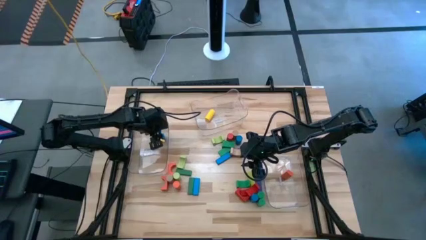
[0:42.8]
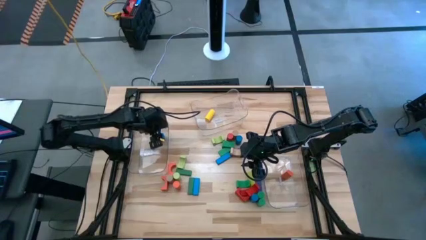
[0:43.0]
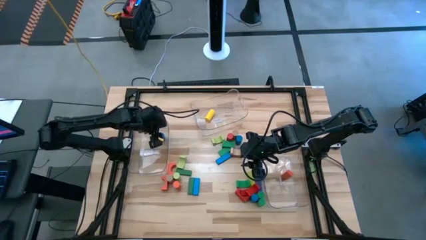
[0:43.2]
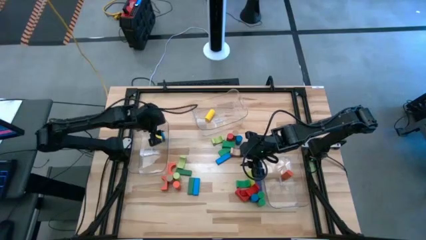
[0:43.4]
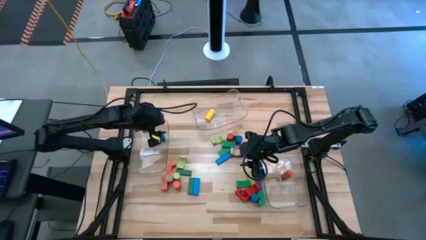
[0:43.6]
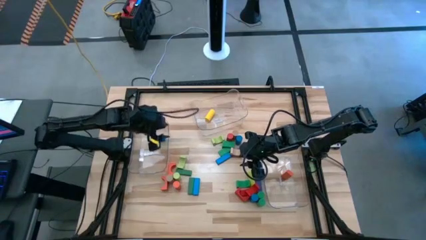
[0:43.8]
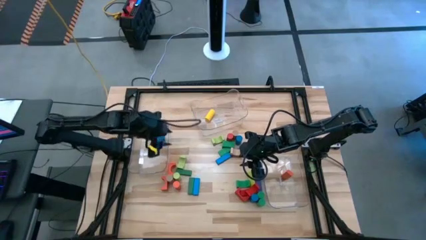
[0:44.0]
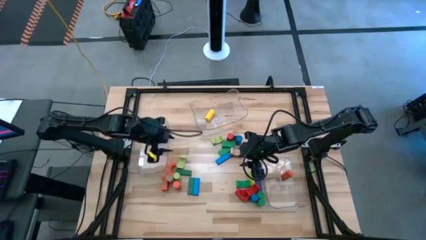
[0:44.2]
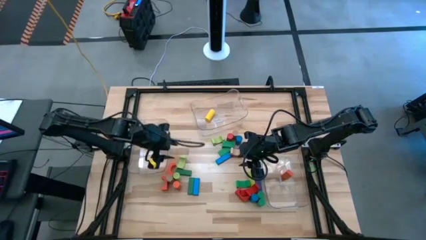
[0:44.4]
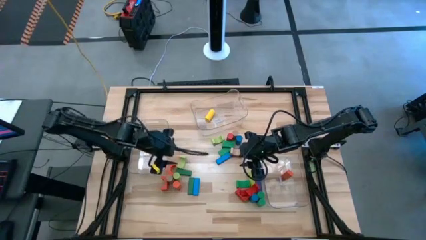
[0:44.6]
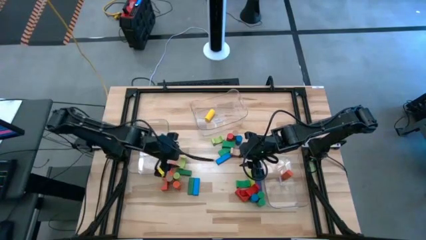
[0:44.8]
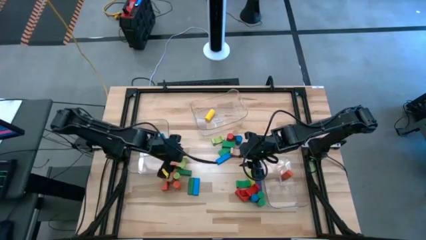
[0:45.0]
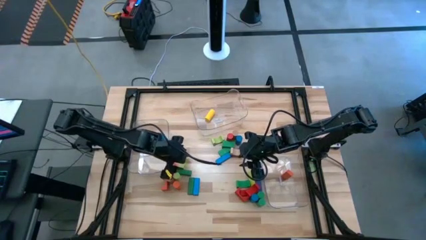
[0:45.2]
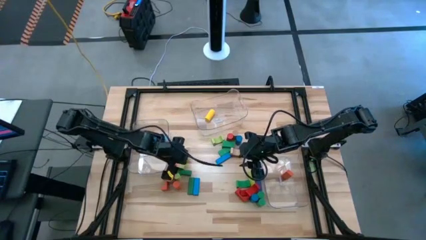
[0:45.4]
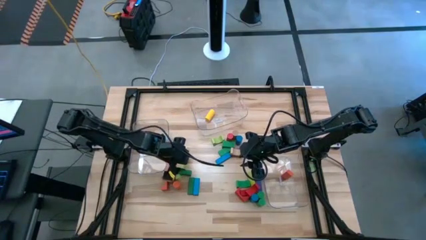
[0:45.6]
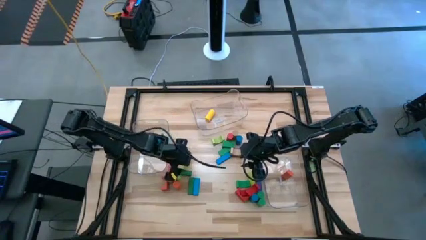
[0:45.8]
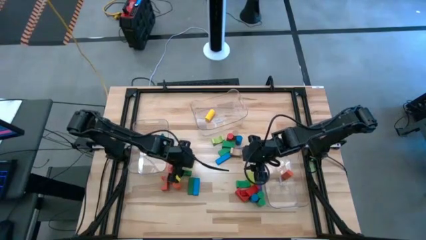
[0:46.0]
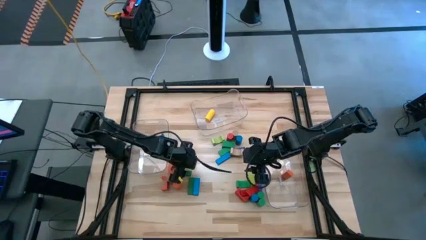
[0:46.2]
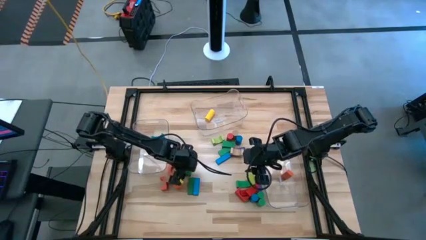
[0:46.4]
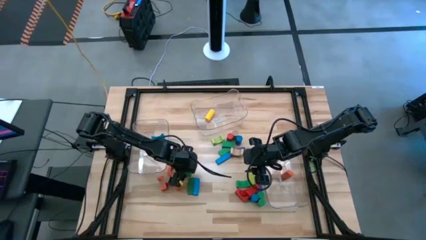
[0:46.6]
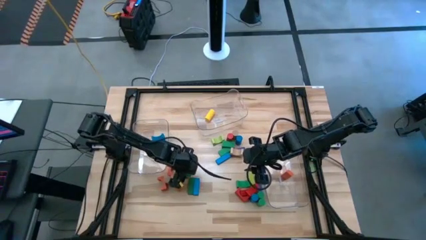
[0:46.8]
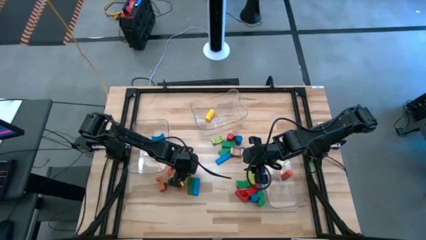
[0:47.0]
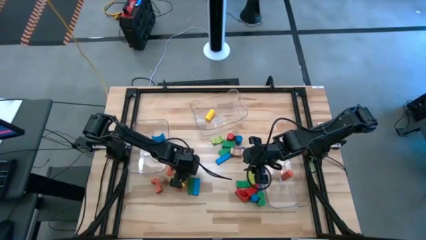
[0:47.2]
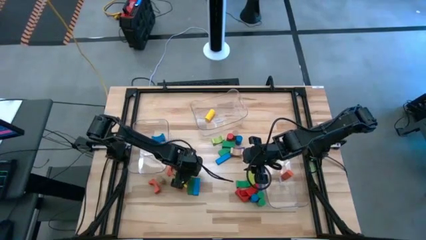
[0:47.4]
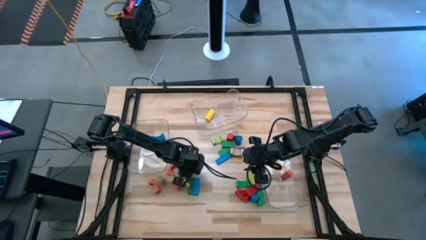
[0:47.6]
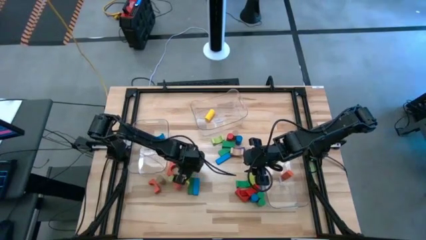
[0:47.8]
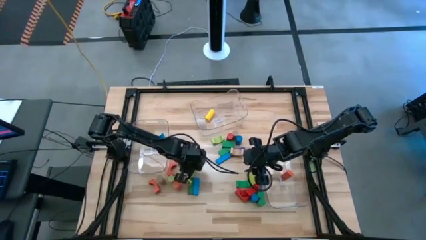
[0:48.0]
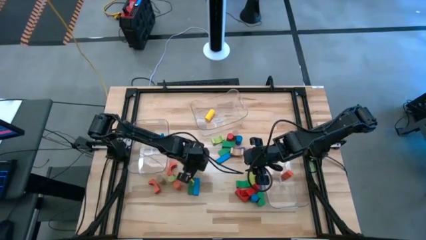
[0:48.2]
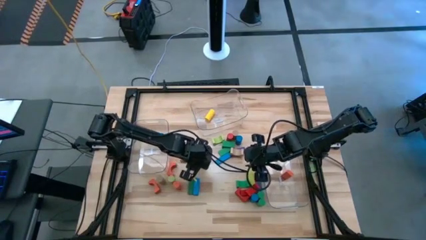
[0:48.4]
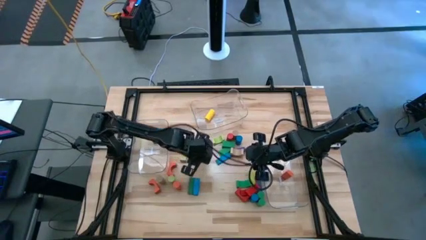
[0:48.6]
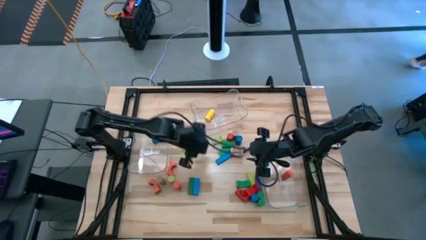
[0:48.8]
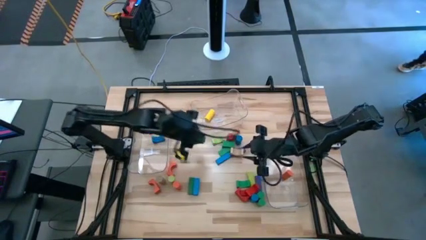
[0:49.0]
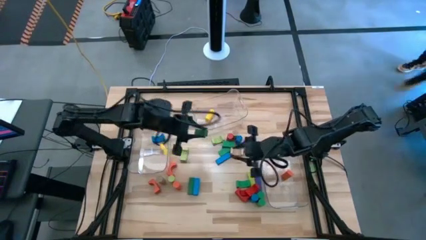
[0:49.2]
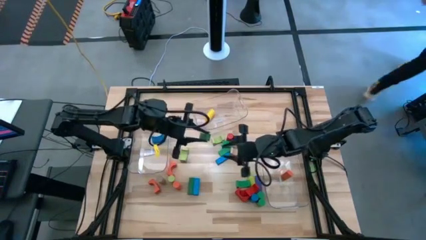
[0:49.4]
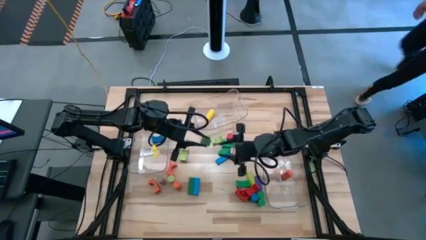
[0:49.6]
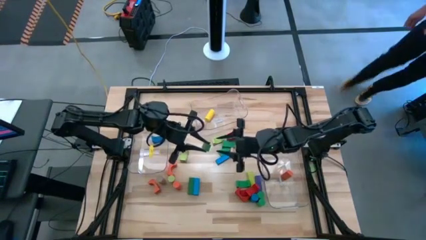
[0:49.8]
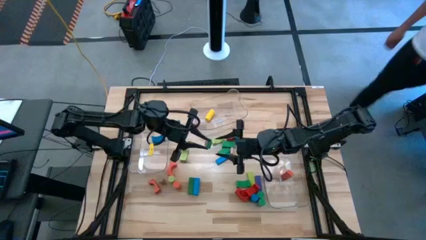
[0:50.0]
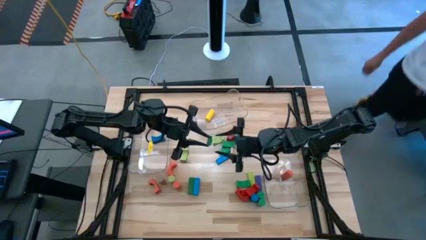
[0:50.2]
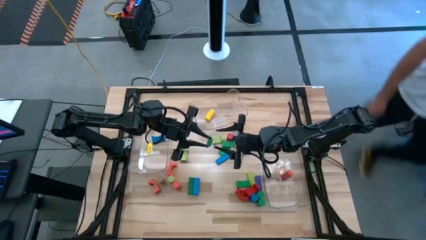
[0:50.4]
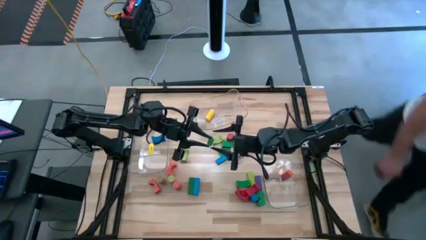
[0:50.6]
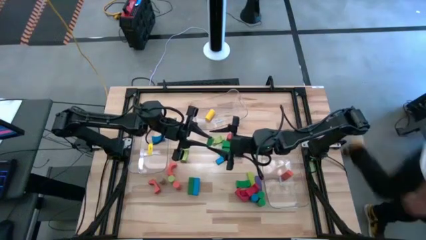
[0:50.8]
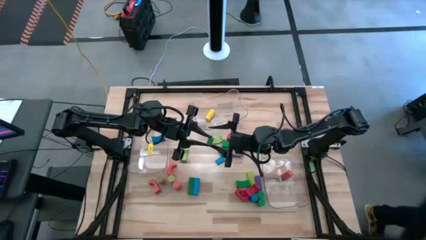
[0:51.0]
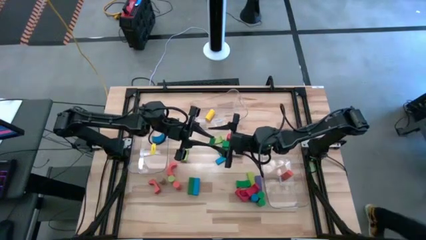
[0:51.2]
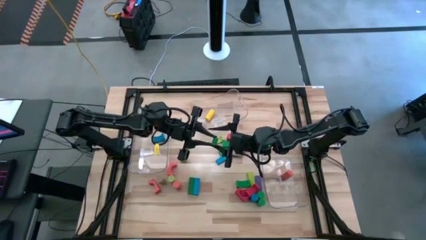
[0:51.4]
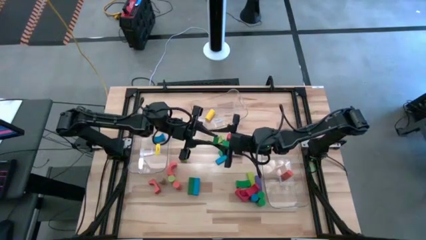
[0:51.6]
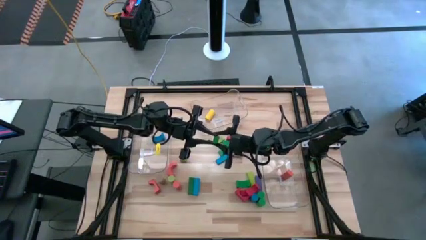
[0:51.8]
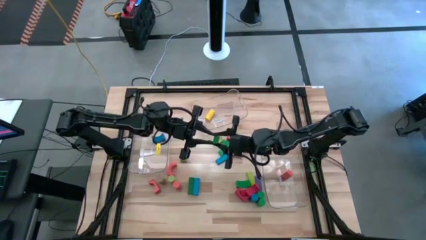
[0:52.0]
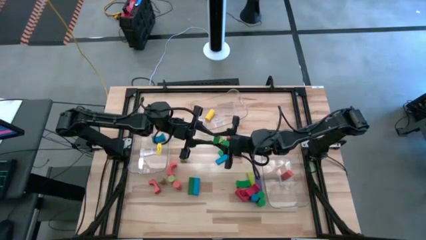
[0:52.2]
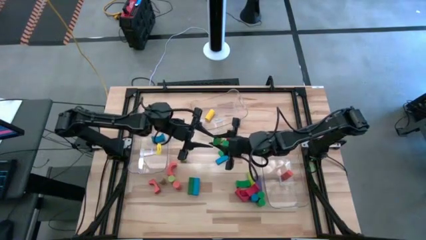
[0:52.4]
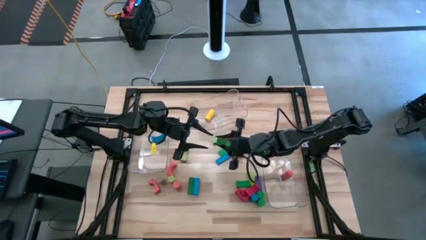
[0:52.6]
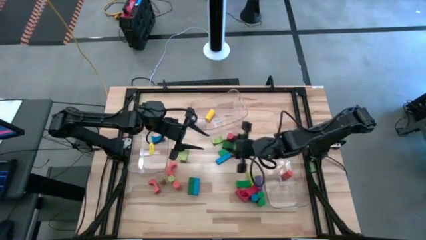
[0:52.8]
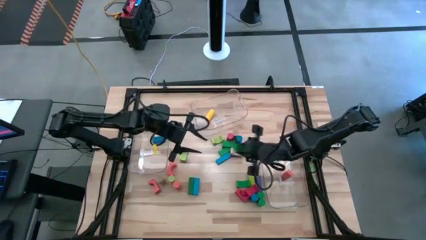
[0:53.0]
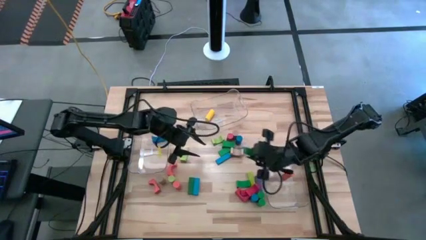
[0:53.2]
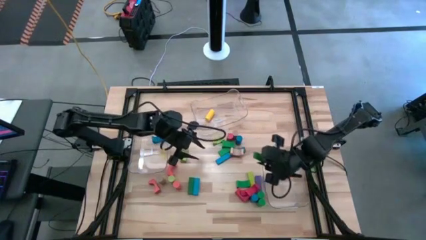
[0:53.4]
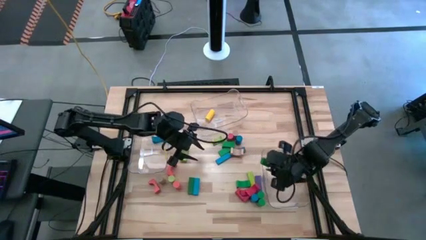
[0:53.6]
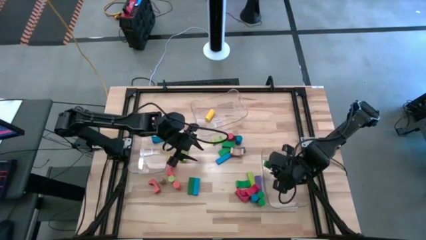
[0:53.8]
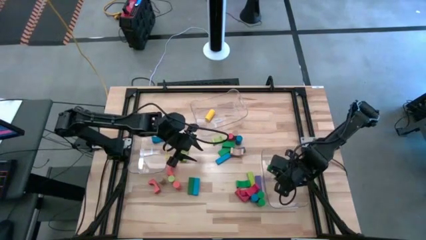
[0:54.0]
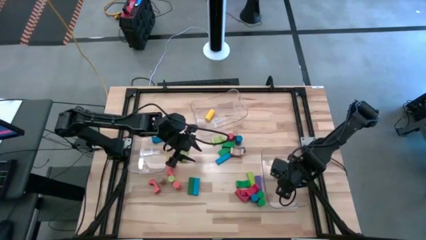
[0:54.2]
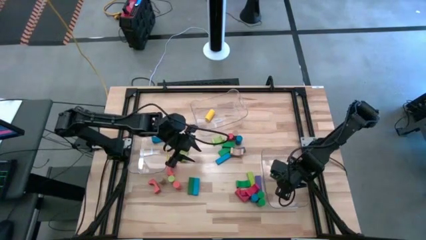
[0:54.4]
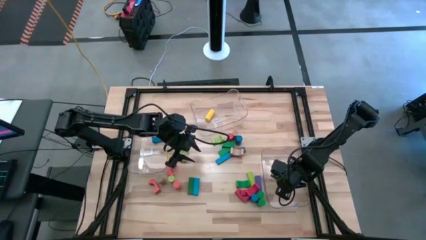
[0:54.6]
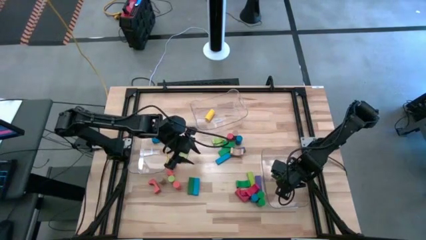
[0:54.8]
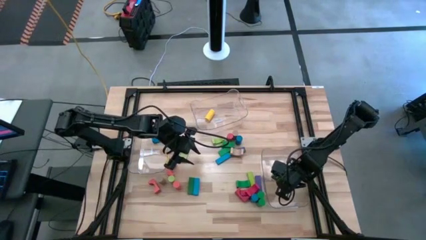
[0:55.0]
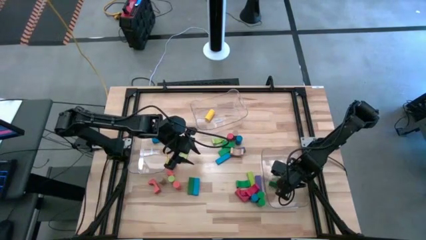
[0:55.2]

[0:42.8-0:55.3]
Task: Sort blocks by size
Put the green rectangular block into the right transparent bin
